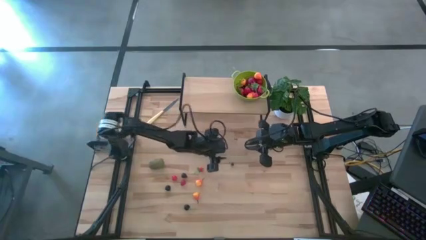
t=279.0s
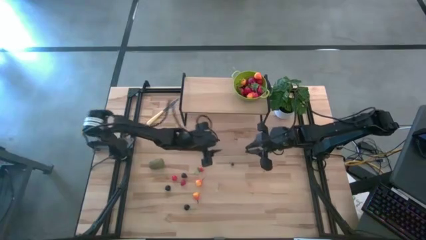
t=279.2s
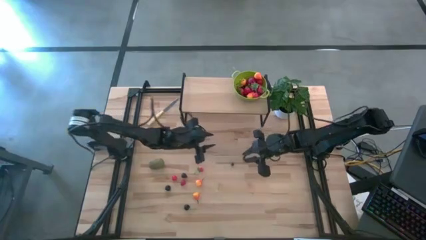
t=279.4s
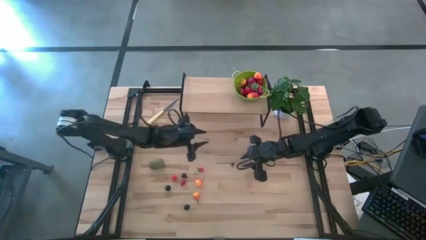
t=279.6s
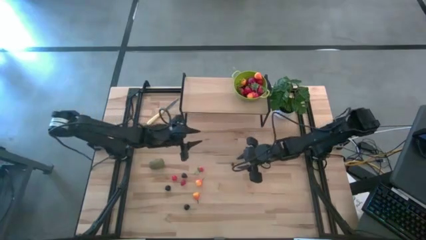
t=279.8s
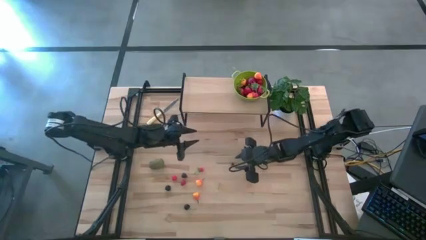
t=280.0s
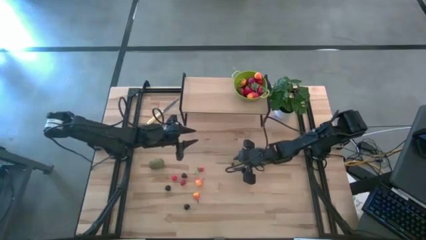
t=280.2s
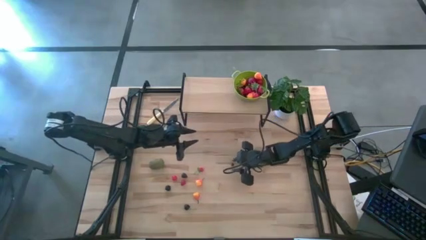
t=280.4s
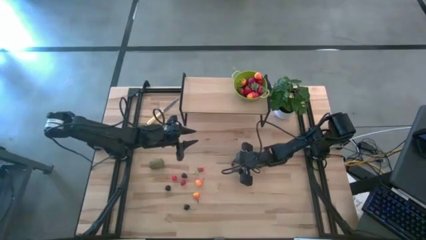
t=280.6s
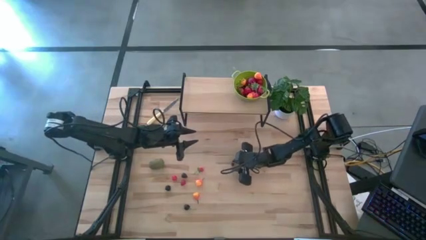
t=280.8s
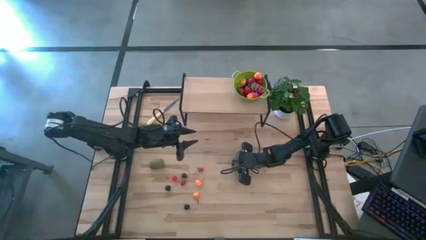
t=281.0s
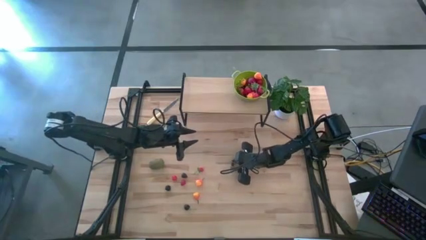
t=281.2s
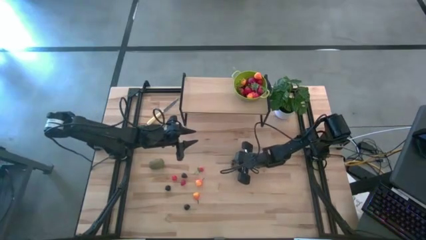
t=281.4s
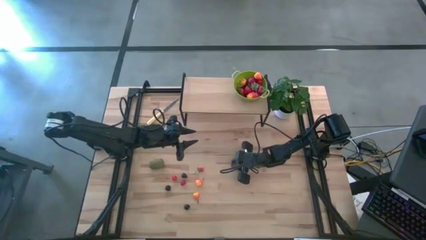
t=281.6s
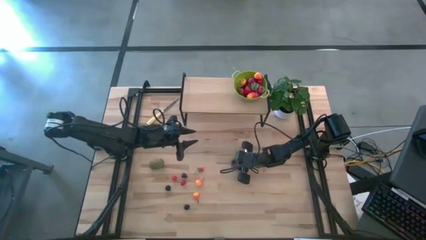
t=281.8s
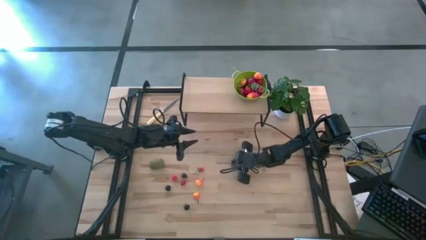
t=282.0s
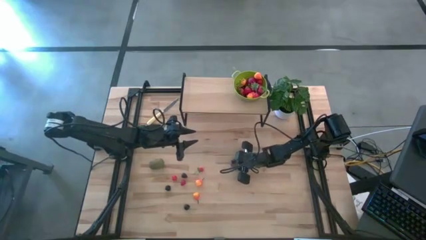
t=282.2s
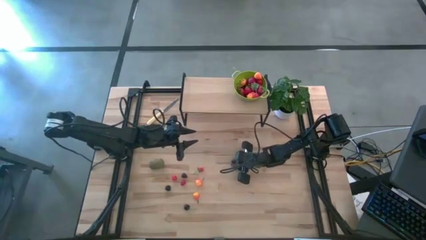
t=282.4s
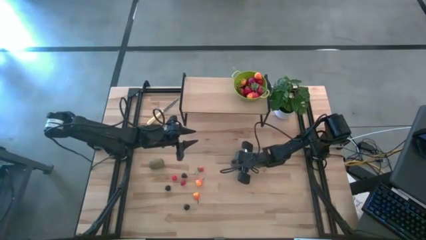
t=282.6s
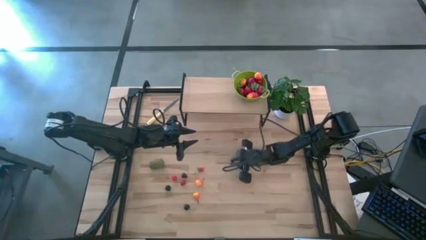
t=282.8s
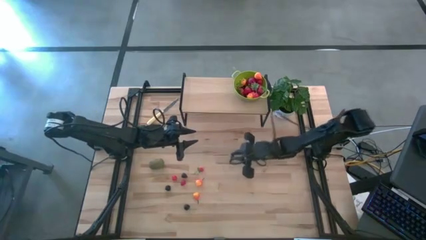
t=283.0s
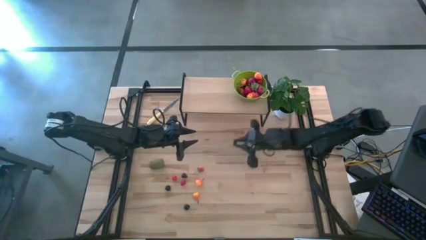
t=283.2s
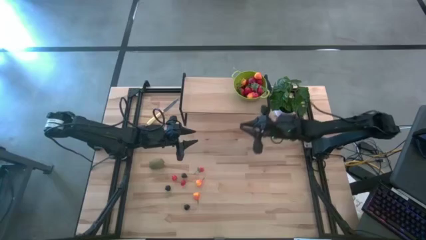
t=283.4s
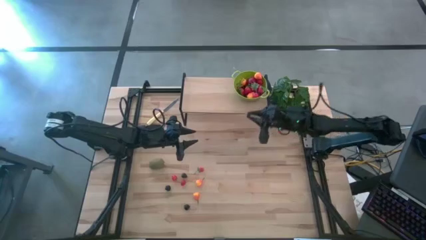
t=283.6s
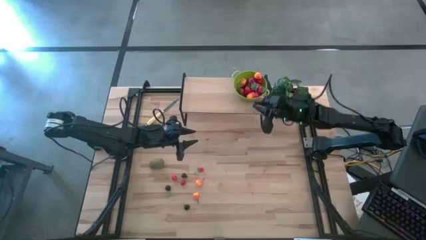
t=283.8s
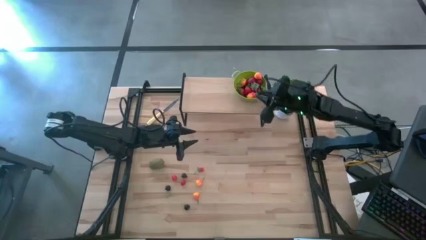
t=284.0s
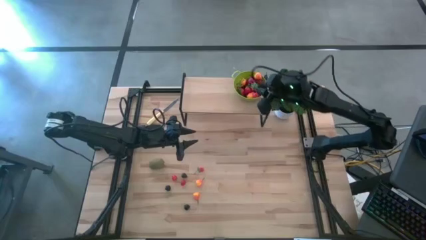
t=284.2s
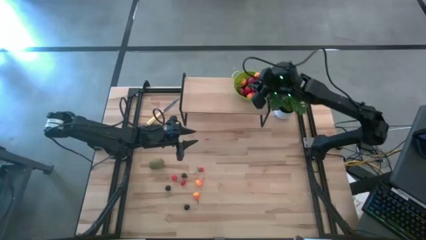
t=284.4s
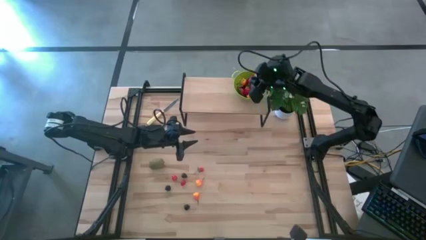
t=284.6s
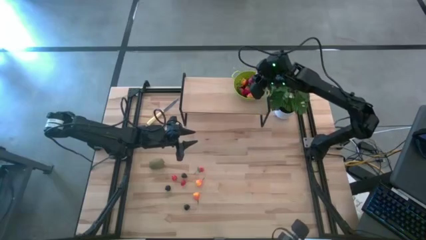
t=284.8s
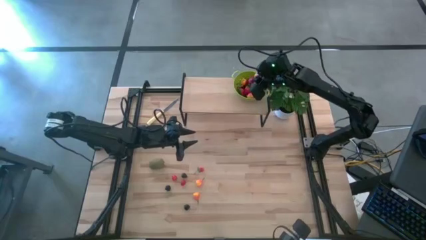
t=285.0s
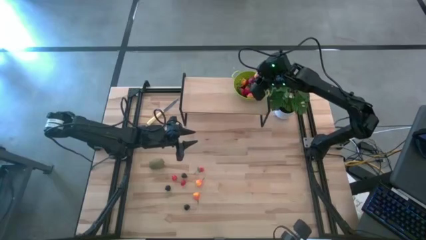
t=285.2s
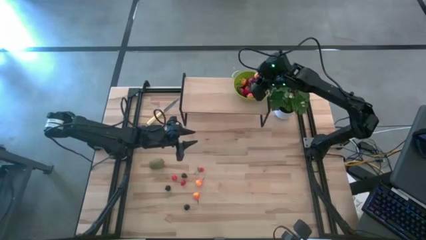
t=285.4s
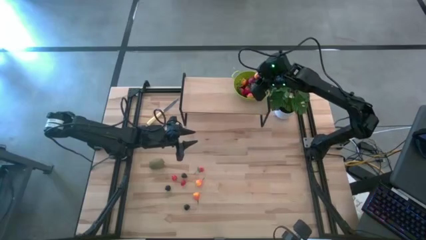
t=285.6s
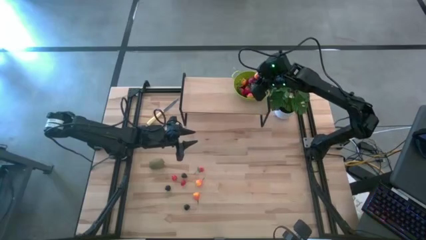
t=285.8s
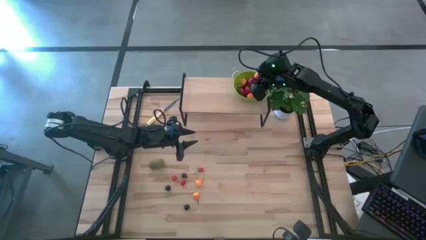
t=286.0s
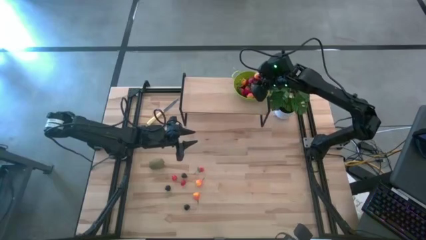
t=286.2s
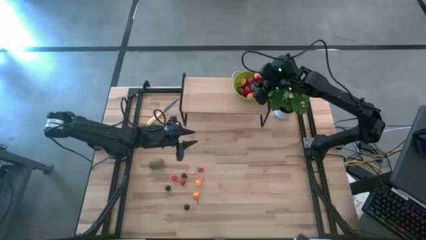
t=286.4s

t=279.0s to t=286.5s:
Task: Build produce basket
Put the blueberry into the green basket

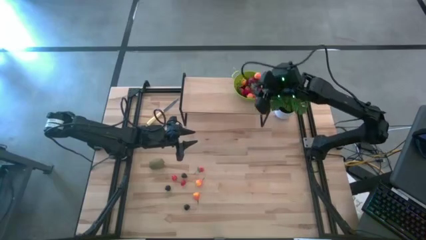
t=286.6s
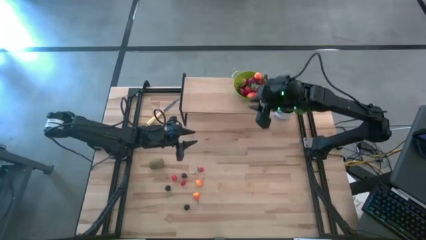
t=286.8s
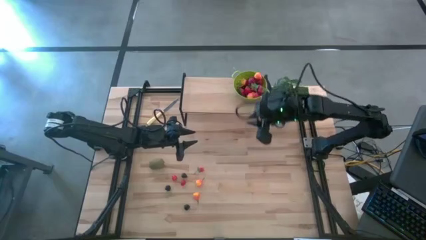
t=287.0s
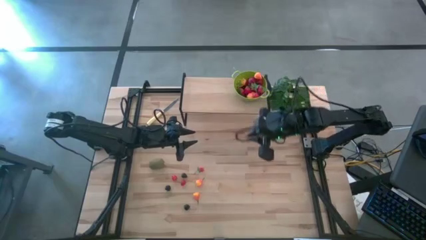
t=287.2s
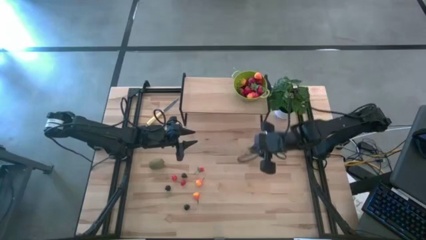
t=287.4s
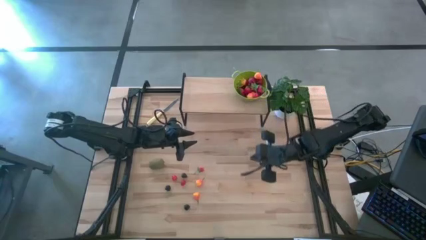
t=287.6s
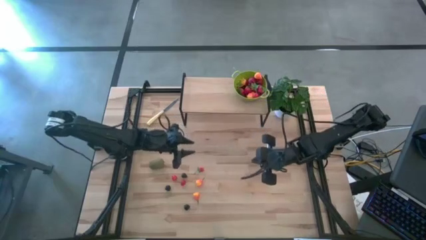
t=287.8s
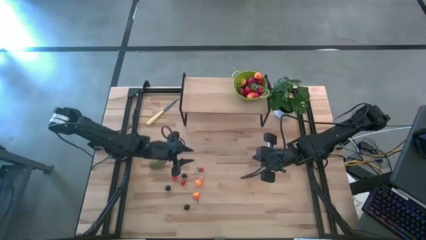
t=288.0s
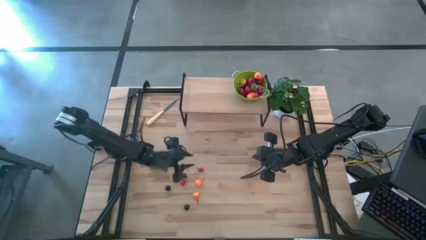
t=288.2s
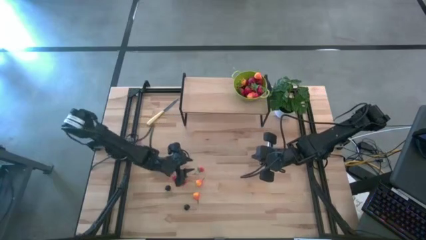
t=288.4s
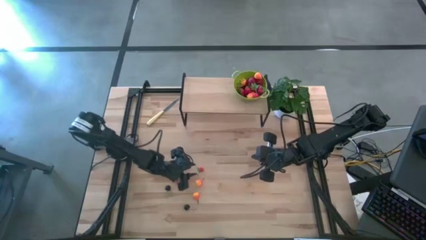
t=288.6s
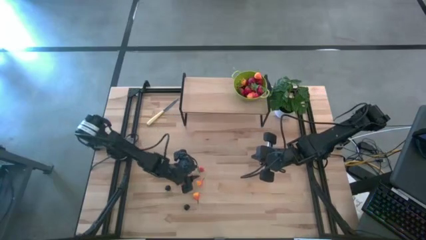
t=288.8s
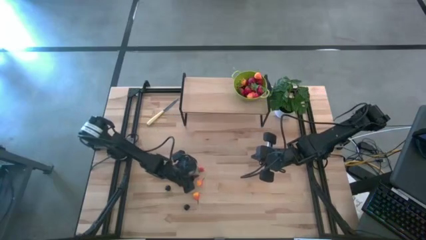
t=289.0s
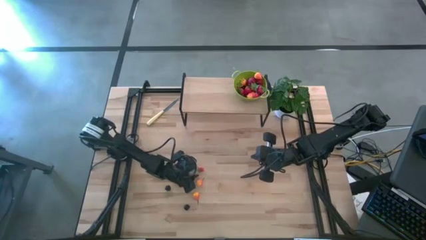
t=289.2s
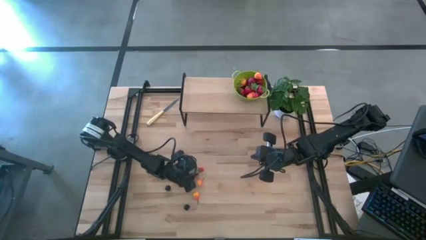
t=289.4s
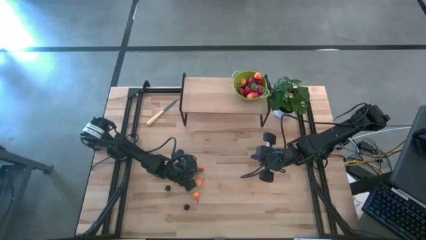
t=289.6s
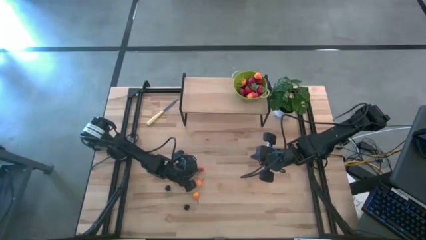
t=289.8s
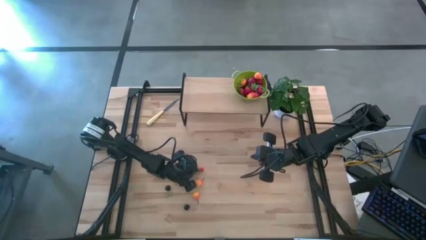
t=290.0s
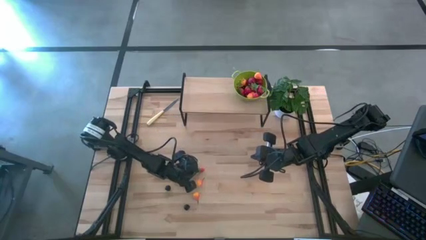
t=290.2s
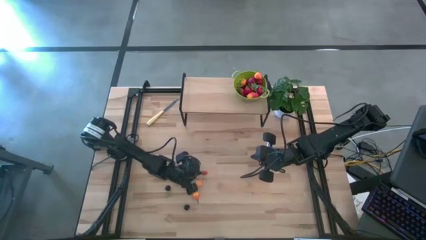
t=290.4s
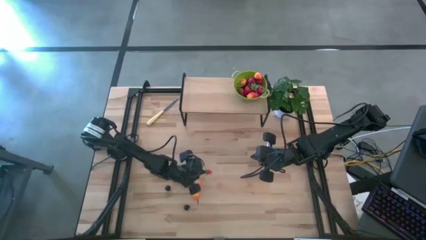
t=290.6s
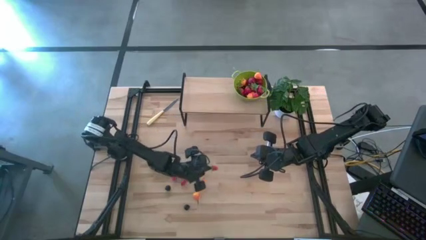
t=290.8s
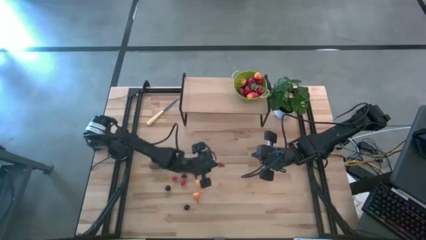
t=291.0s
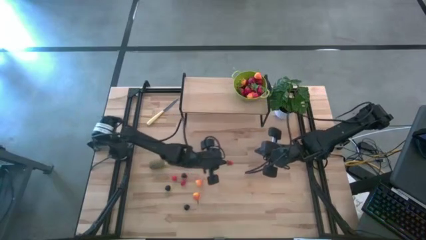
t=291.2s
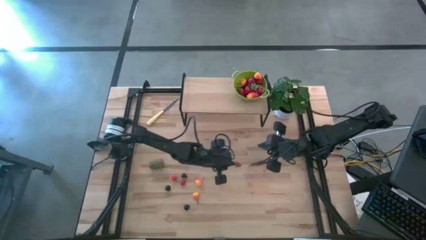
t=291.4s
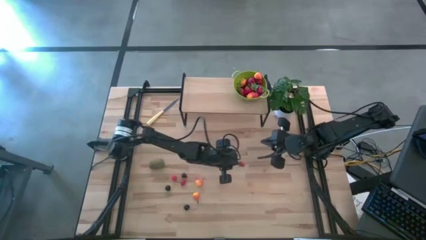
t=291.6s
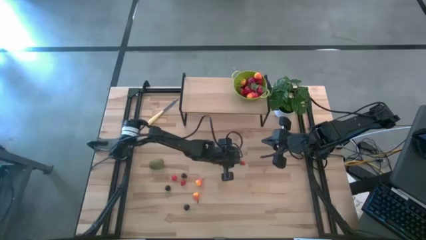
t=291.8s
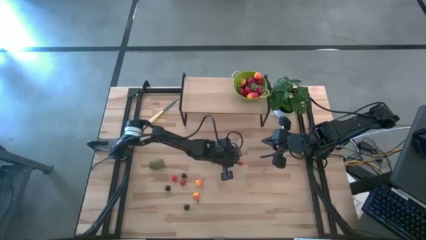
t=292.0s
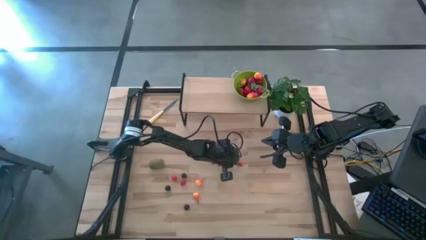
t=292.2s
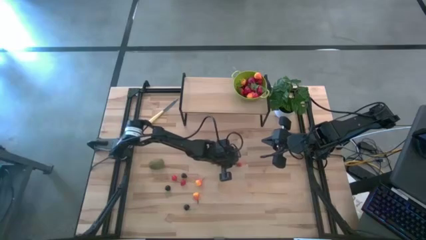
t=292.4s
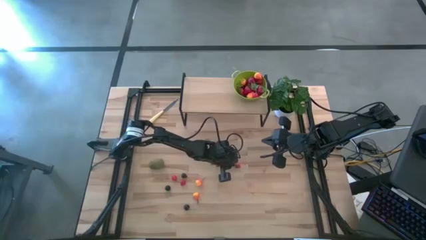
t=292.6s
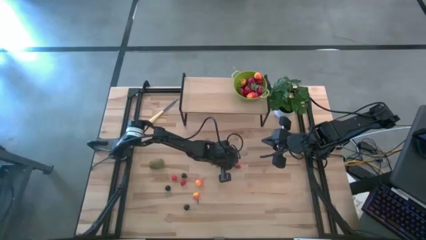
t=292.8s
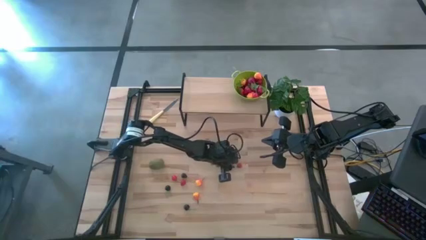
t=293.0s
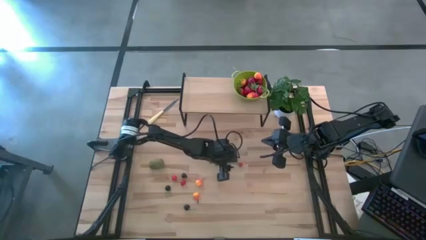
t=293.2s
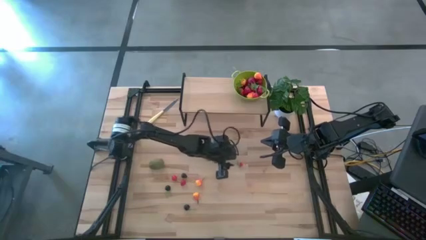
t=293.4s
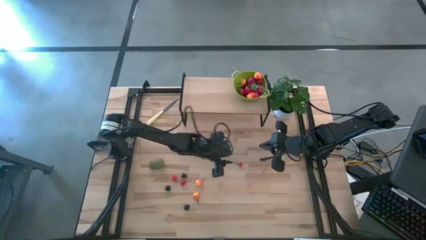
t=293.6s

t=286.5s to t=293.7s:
Move the strawberry to the center of the table

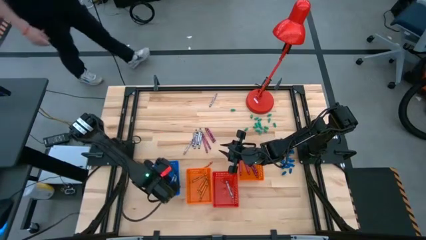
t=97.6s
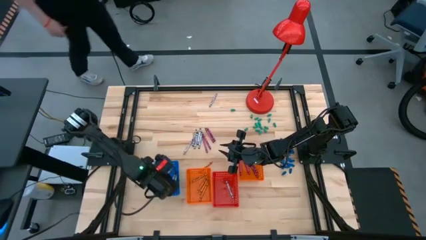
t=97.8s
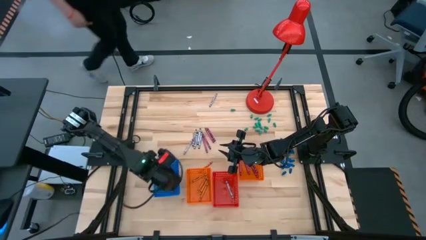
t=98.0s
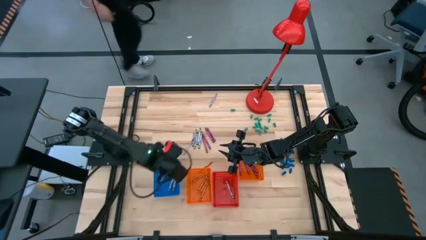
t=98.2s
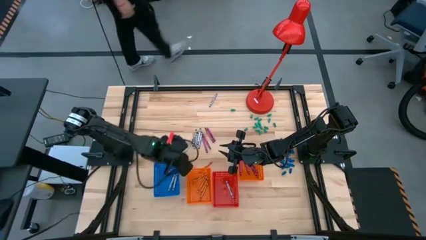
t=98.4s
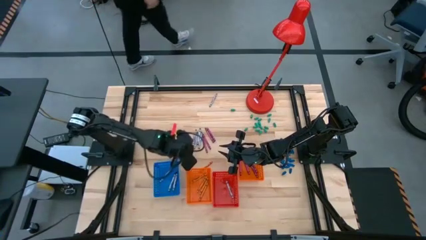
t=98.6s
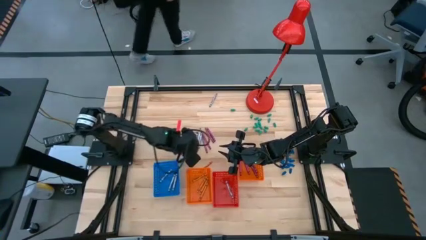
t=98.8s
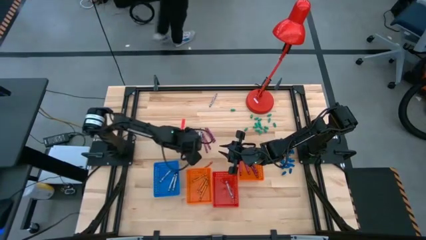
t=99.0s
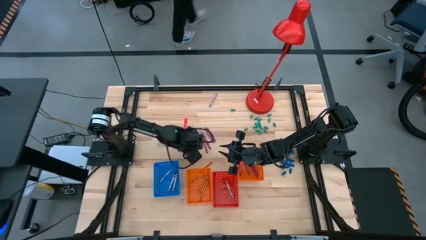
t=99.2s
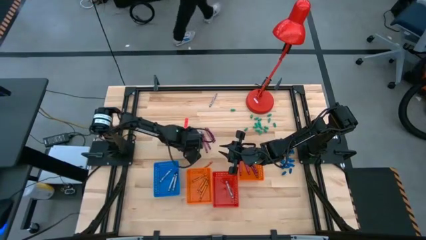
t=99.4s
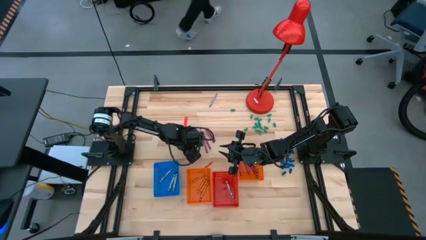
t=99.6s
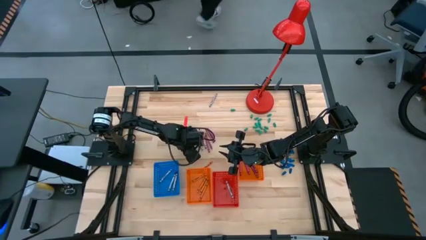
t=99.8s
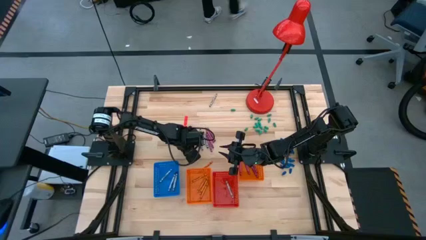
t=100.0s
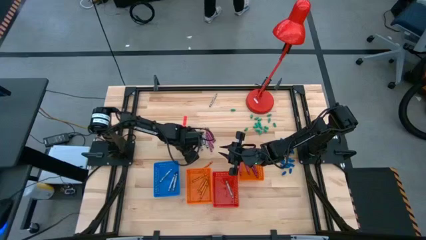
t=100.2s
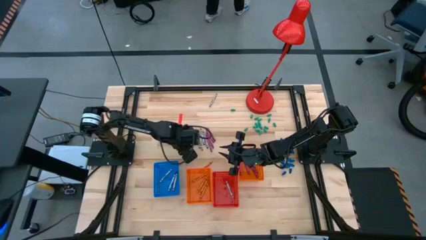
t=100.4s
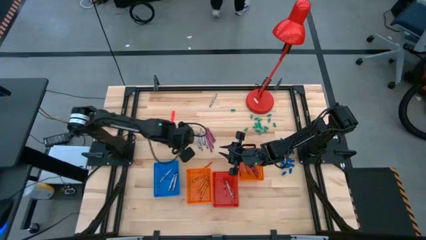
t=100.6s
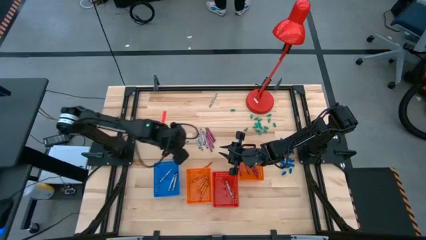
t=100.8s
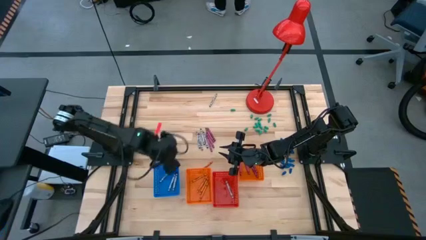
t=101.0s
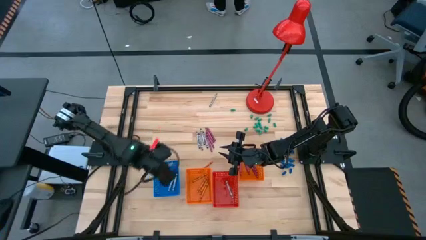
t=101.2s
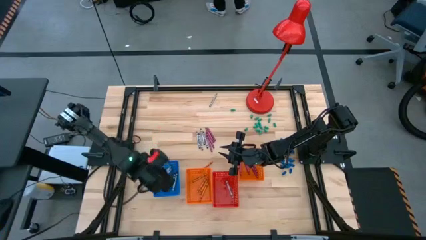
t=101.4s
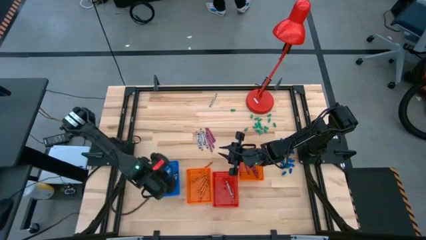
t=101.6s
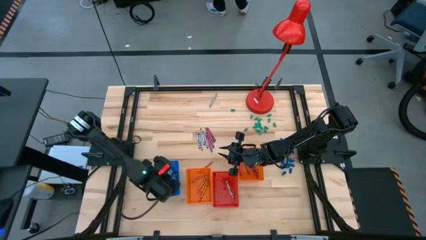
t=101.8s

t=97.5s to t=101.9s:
Task: Sort crayons
Put the black crayon into the blue bin
